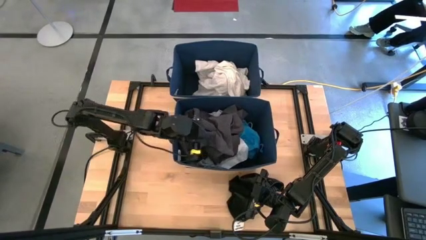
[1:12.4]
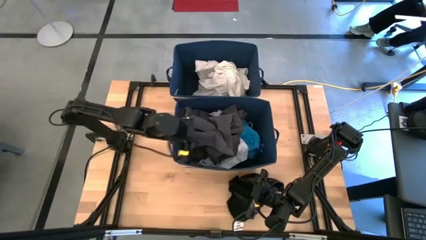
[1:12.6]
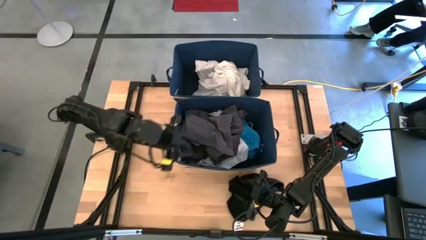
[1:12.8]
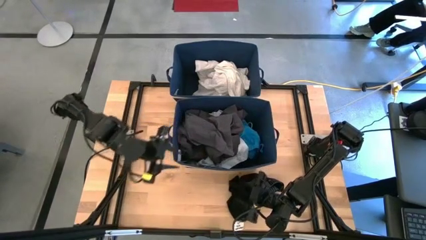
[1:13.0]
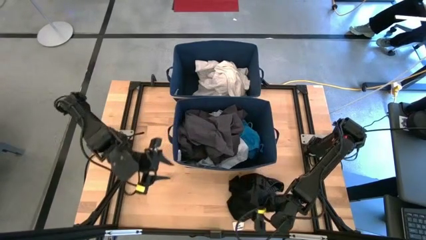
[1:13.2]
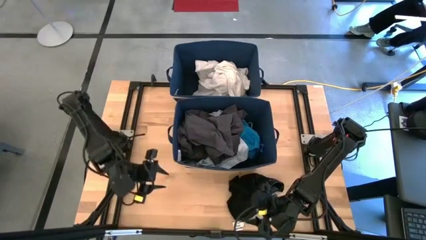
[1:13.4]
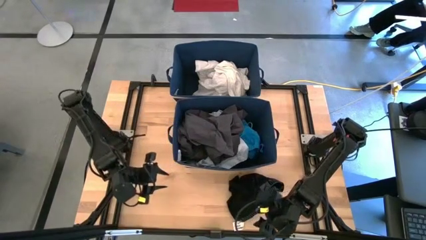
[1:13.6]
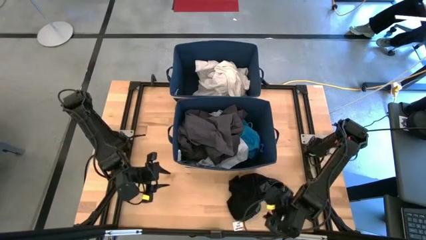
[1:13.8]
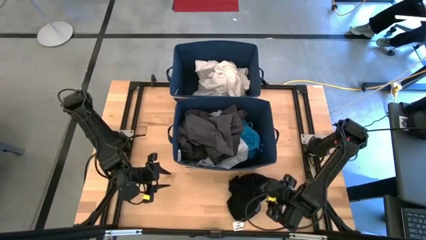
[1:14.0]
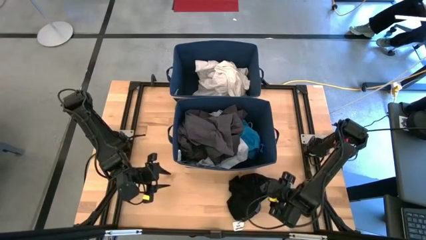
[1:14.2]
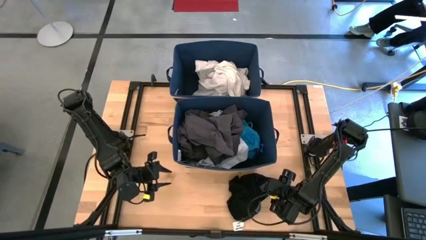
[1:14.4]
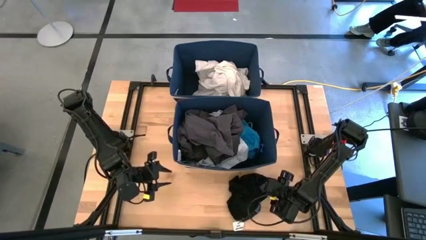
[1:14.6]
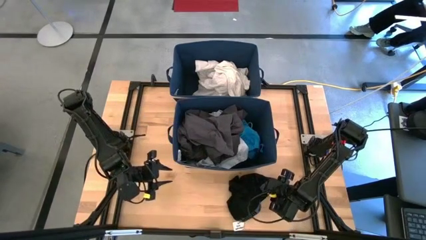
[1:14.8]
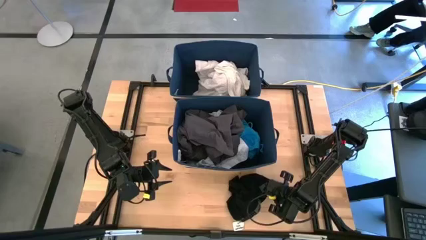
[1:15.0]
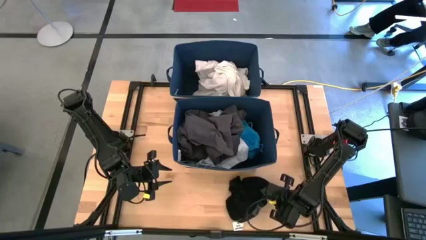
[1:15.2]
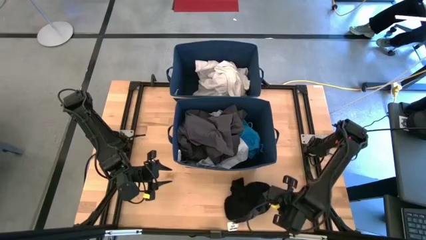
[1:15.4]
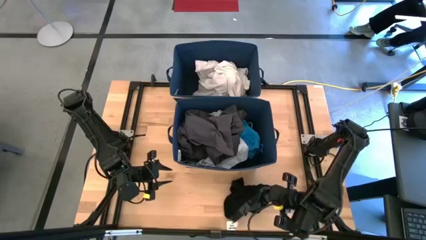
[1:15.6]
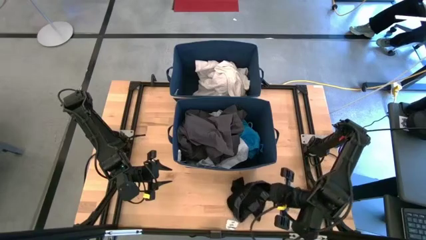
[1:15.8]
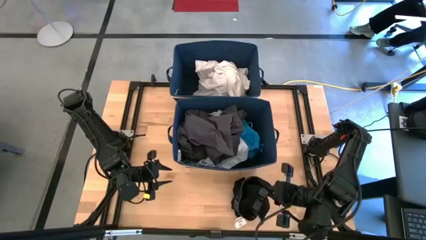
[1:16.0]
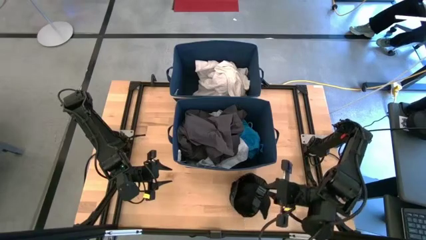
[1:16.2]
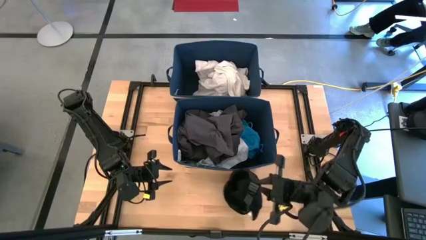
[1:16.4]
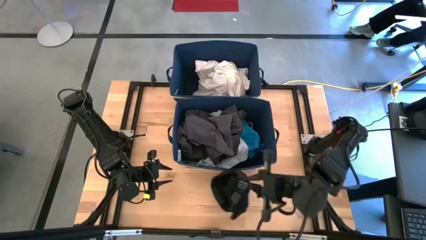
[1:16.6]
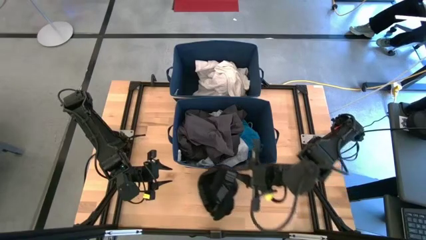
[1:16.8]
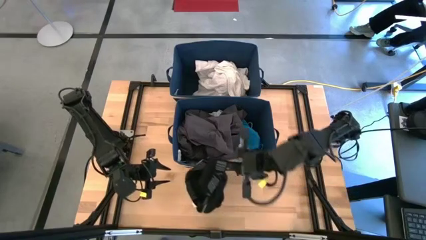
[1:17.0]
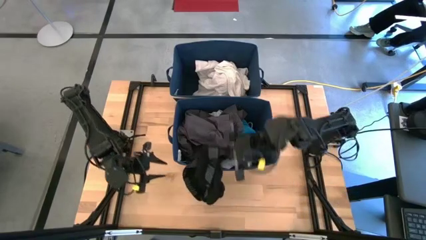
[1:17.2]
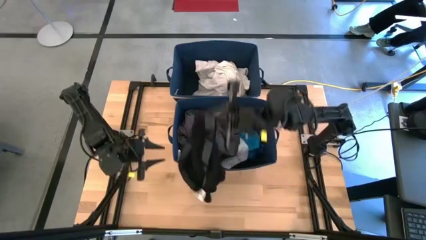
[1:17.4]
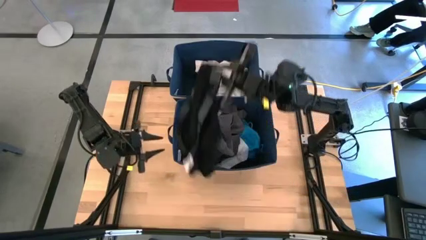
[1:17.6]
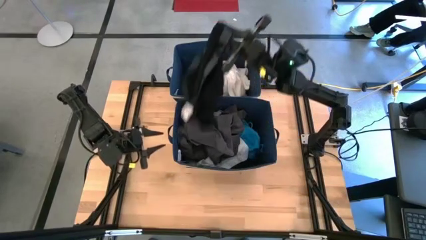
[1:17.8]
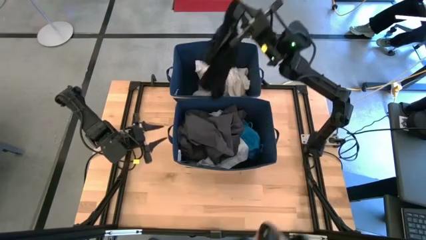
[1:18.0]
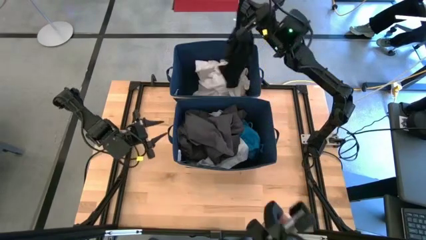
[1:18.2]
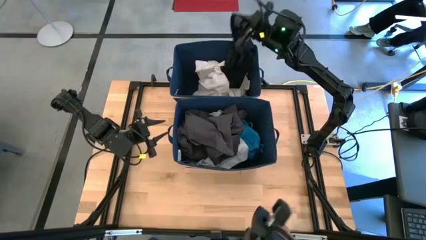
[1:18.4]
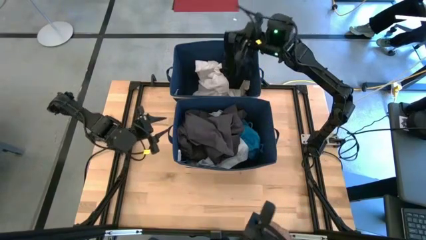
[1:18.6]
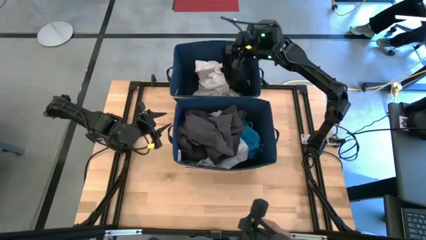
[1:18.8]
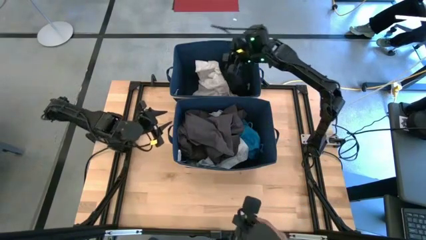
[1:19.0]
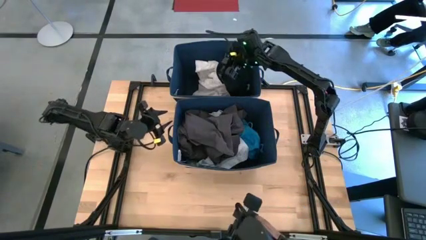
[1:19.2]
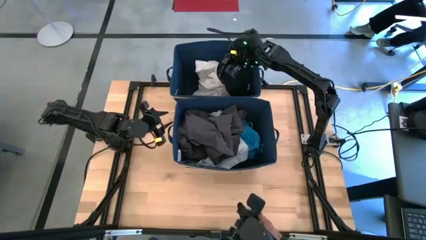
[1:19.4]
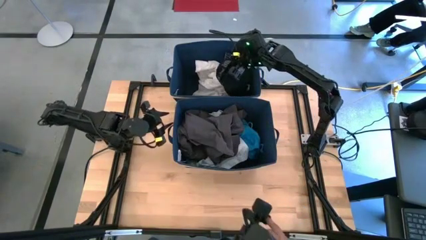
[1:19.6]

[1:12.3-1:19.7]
Task: Sort clothes
Put the black boxer into the top blue laundry bin

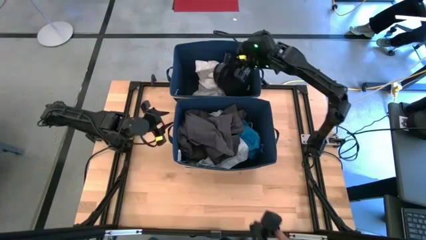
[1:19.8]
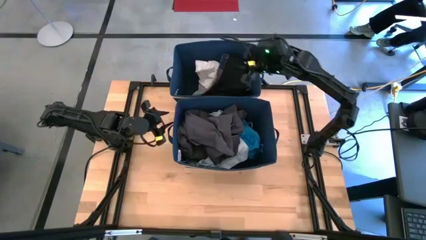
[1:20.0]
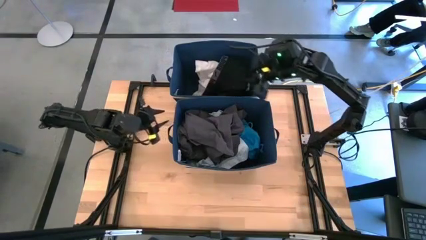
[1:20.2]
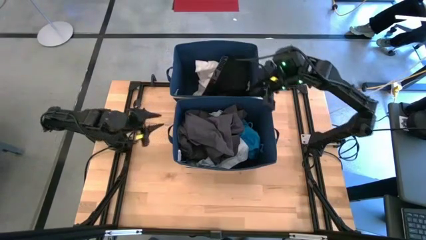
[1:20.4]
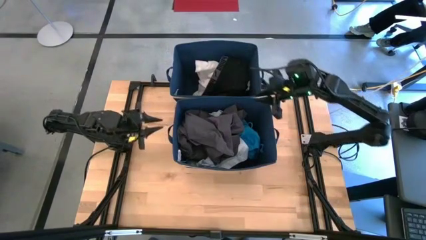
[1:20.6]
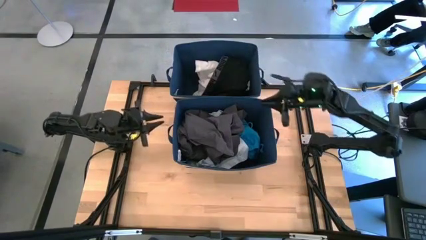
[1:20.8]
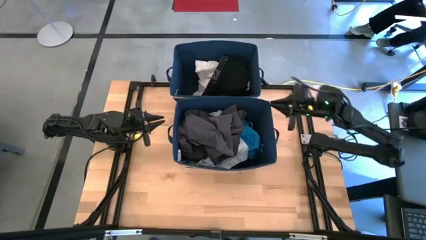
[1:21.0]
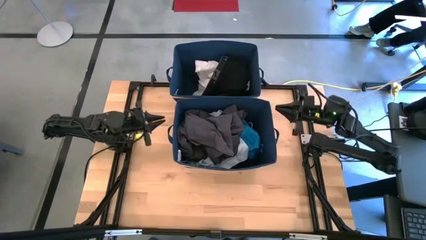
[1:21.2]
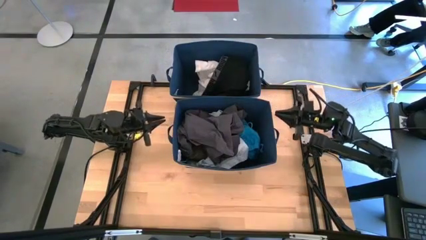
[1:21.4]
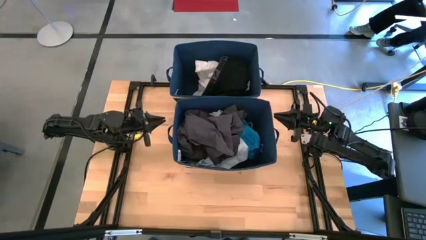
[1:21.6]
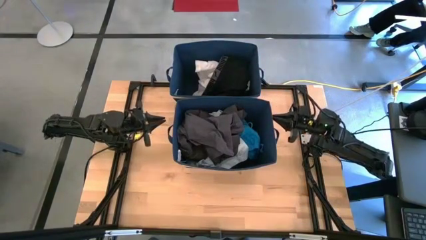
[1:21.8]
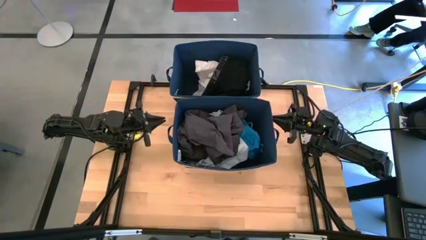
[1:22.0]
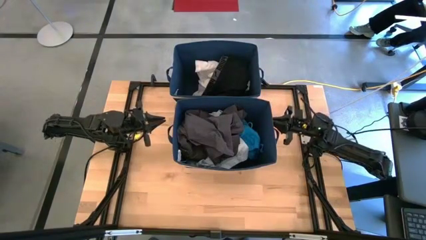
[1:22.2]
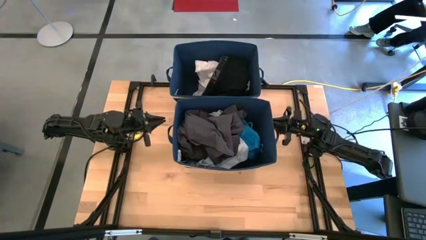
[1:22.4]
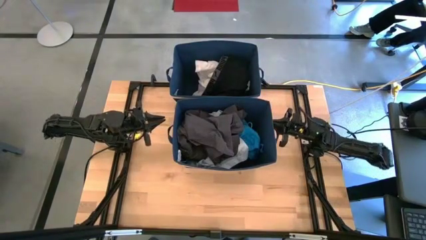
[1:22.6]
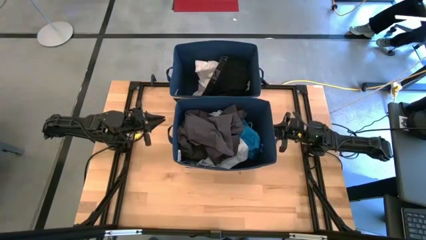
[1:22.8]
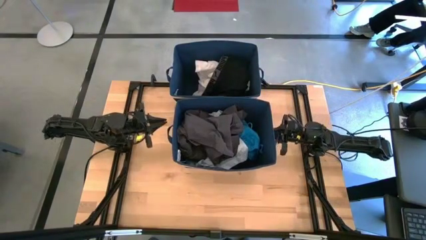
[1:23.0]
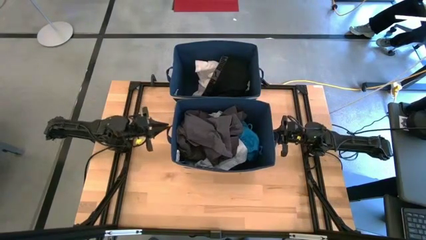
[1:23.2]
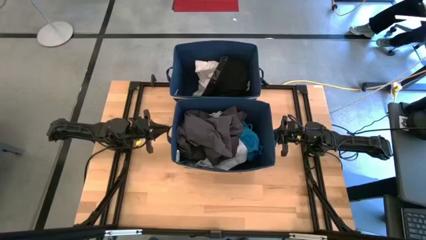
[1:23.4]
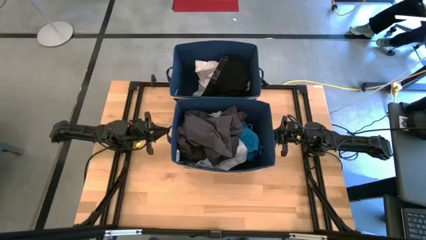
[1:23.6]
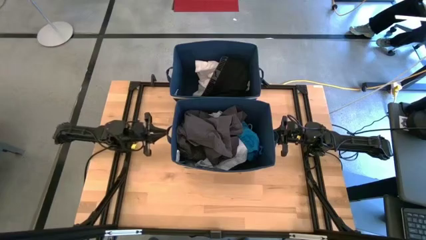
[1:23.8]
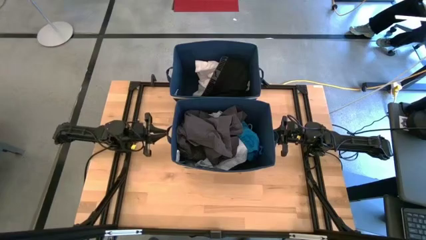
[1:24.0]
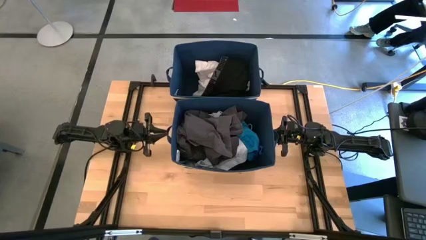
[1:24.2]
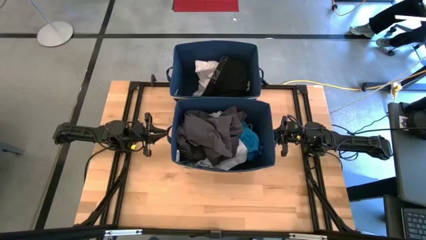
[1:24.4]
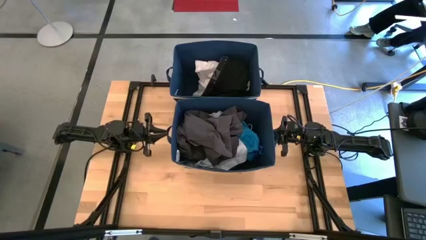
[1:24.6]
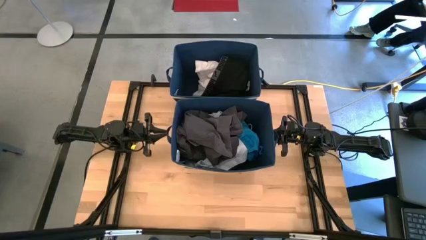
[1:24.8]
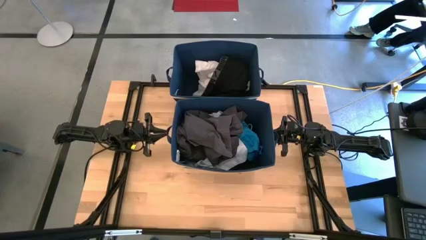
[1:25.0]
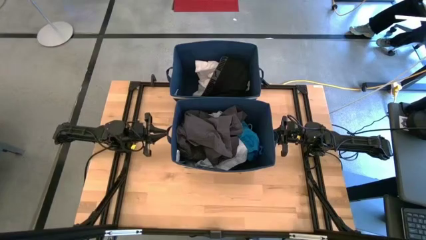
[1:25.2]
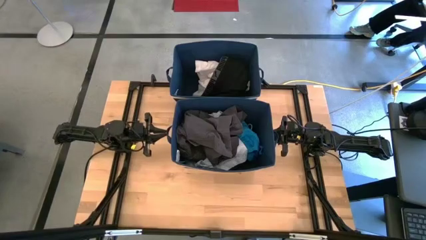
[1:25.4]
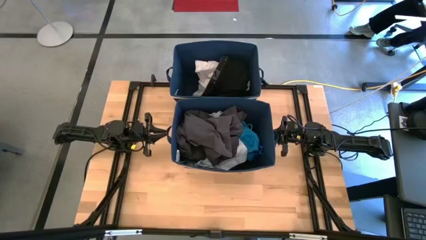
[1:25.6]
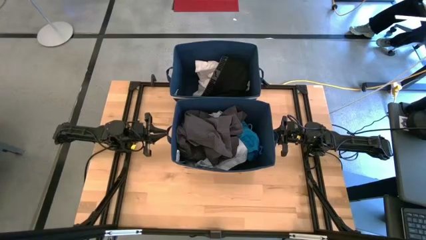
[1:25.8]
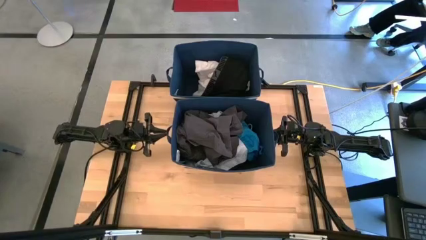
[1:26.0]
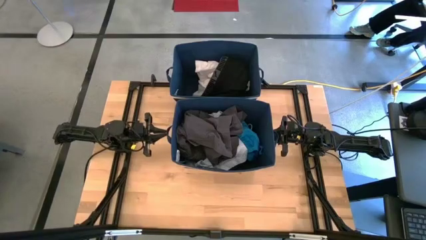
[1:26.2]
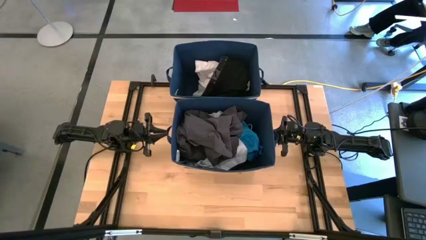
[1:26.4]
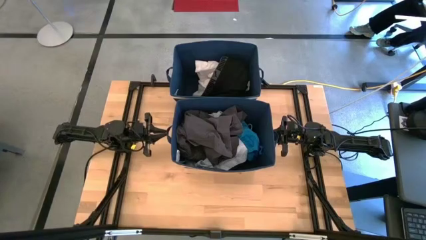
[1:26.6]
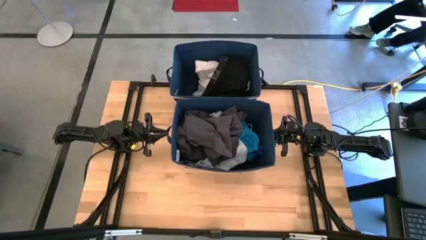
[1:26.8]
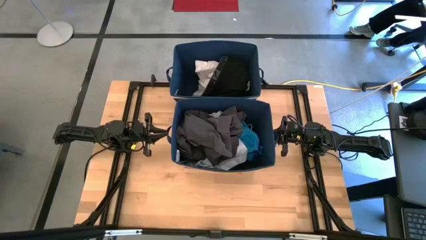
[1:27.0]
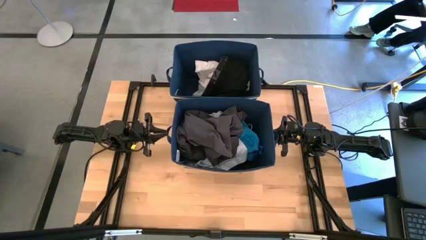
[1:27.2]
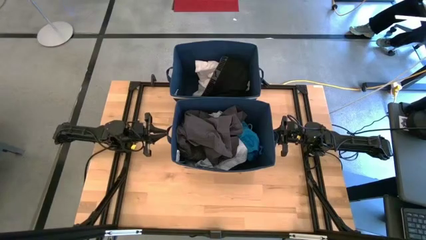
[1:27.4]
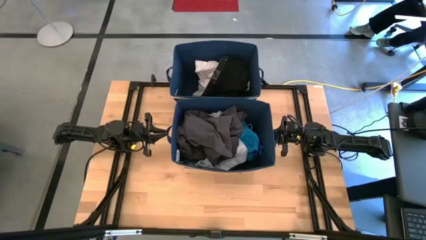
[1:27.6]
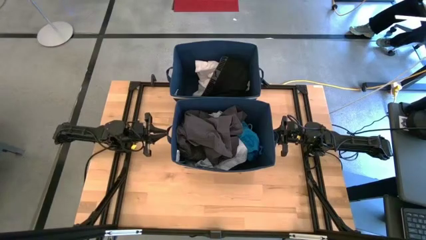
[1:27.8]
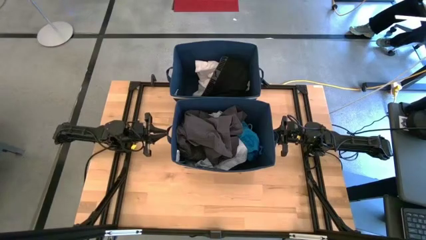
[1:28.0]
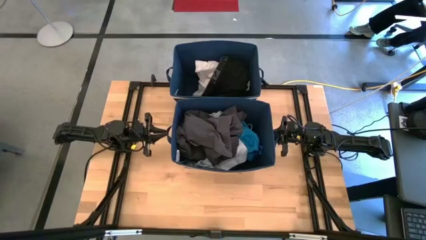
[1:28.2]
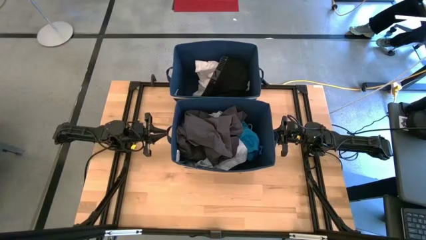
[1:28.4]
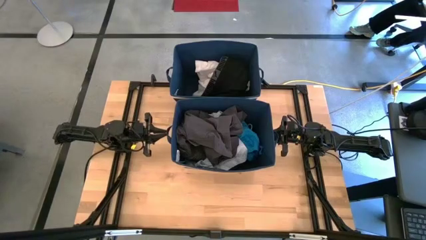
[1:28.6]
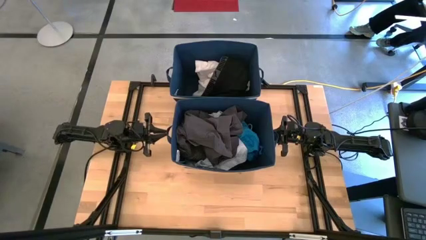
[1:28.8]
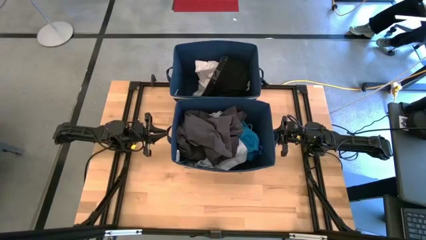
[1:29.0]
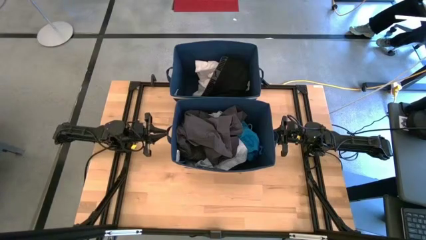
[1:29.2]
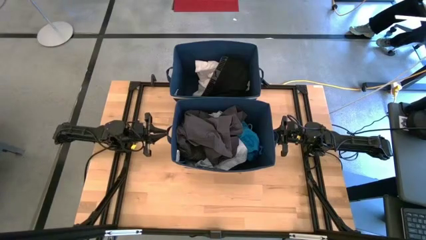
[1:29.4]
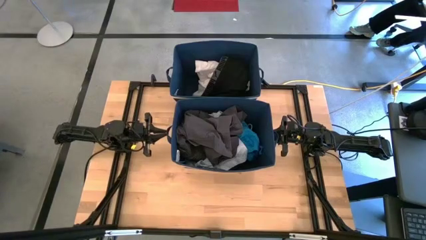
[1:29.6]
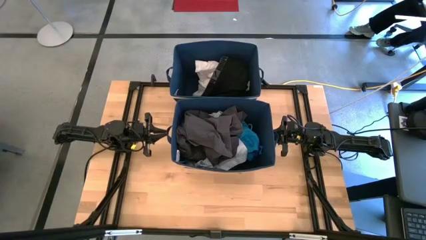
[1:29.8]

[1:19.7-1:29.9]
Return to Home Position
